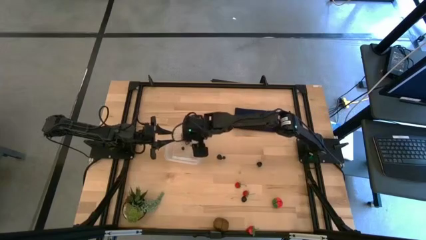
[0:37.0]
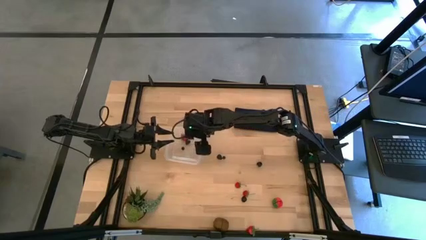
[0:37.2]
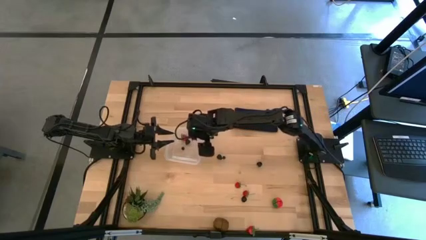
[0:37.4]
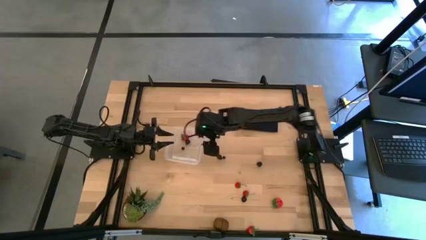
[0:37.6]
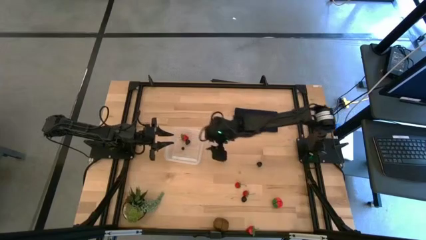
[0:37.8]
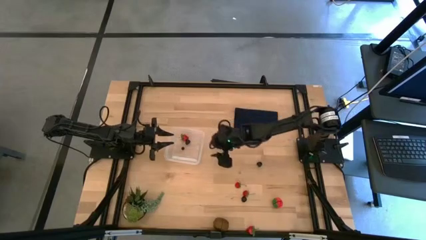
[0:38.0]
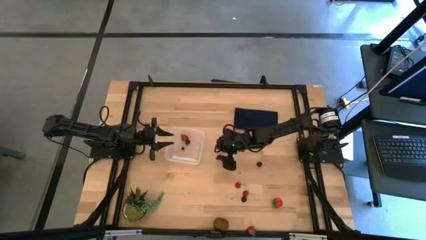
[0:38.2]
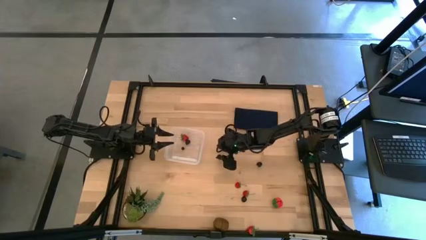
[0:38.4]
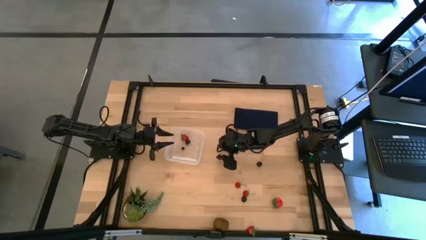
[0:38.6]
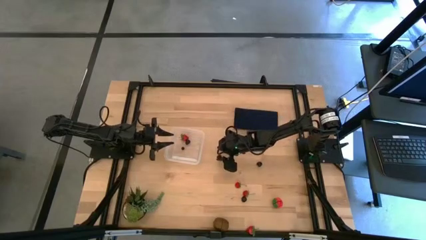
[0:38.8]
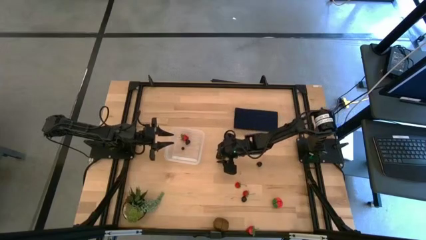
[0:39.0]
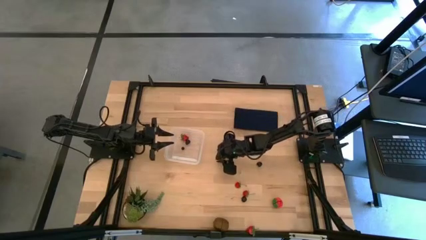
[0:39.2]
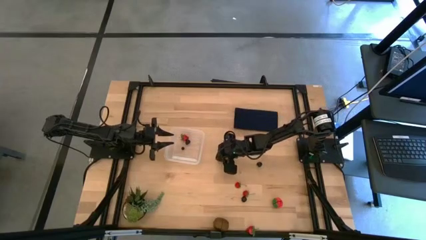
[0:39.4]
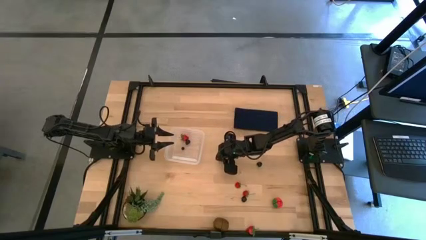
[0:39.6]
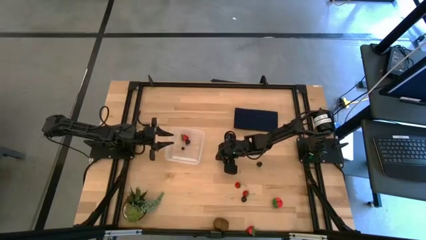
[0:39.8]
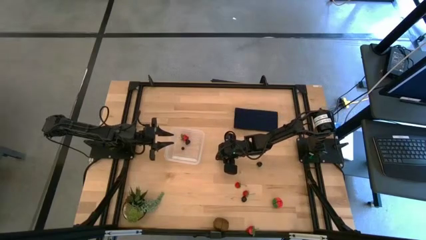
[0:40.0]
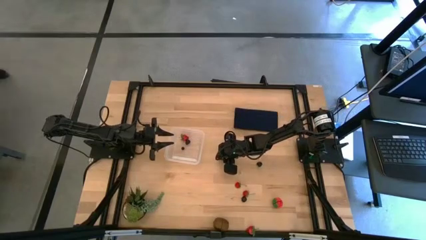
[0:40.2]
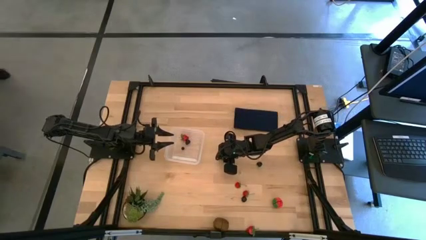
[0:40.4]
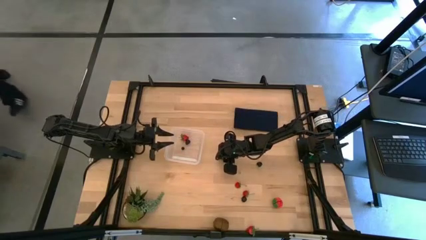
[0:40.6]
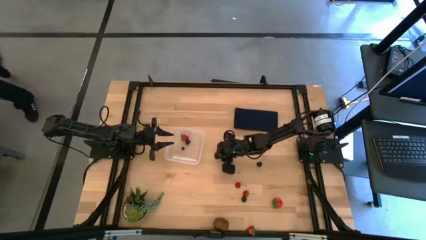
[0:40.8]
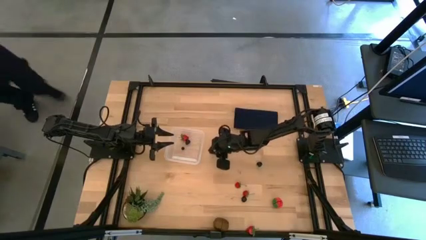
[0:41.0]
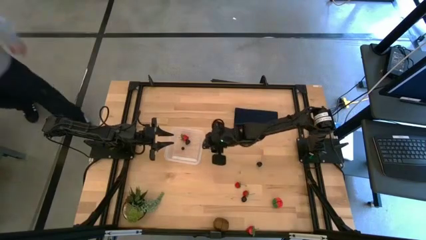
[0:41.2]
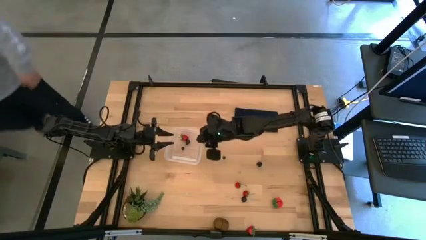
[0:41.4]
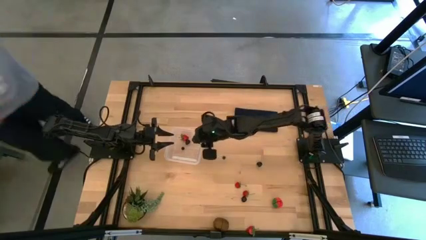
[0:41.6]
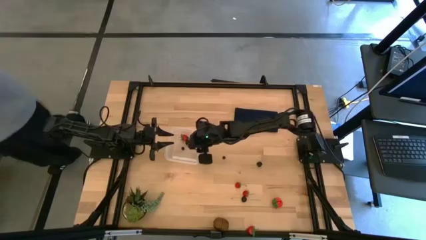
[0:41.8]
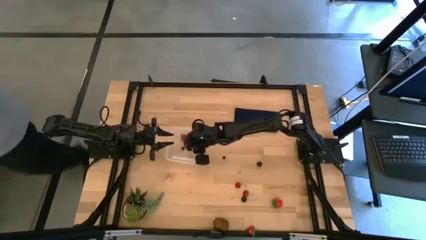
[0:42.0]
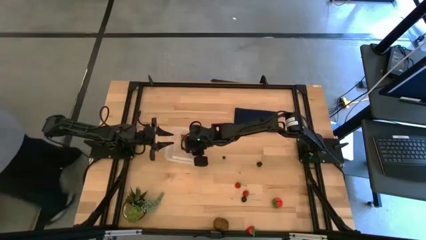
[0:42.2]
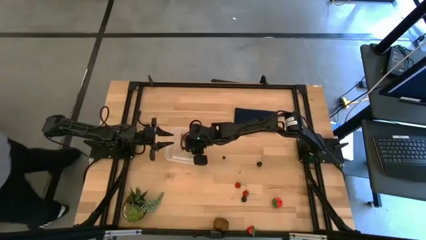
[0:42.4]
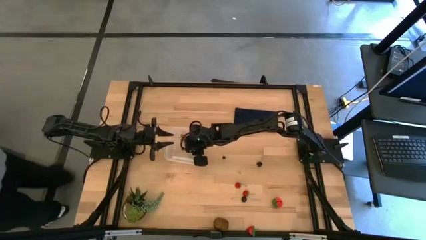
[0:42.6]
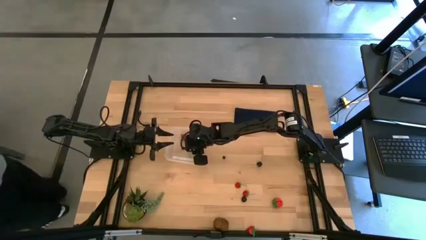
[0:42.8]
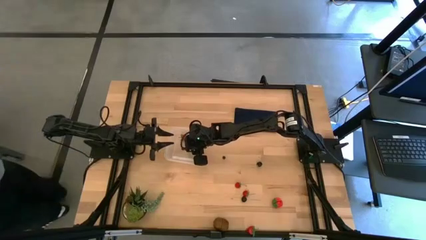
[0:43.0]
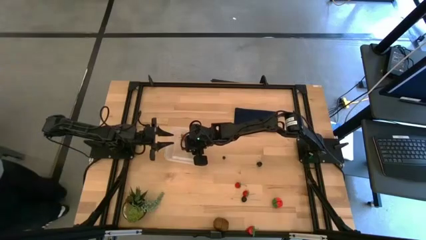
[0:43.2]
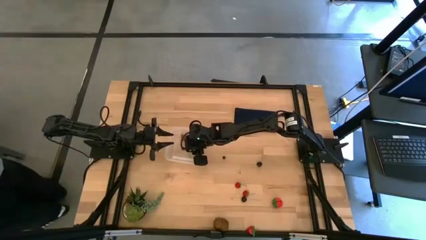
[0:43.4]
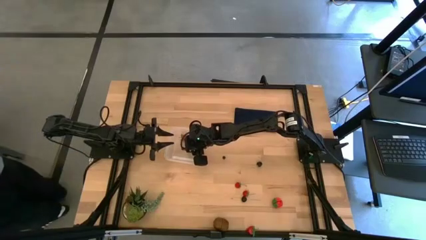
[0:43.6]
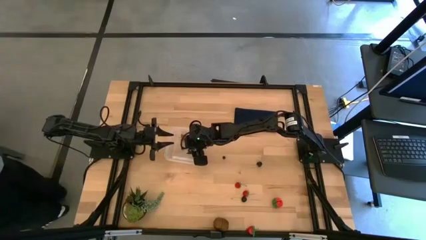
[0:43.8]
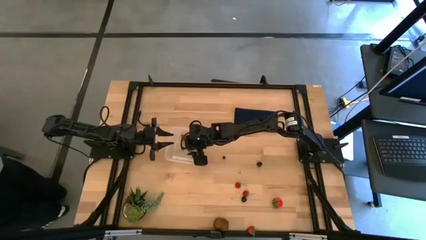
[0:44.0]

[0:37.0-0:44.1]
Task: Pick and placing Produce into tupperware
Put the left blackberry into the transparent bin

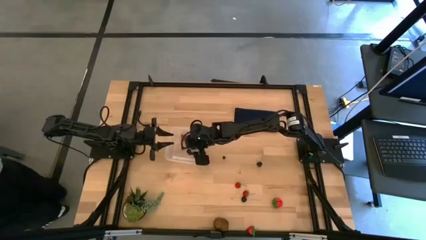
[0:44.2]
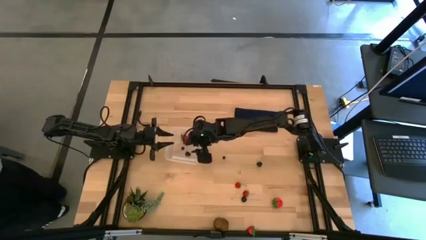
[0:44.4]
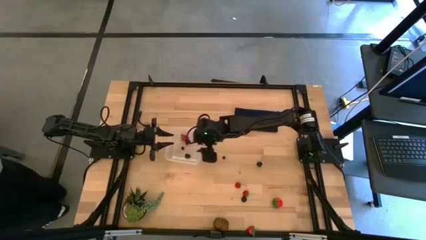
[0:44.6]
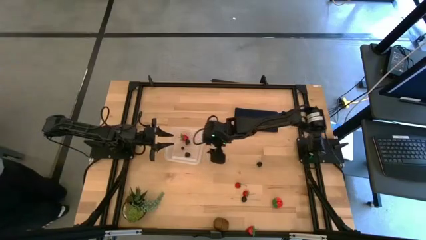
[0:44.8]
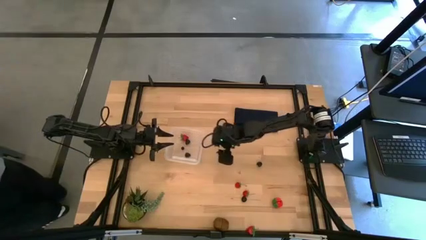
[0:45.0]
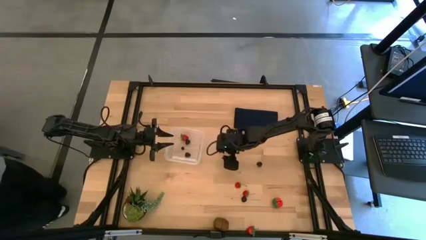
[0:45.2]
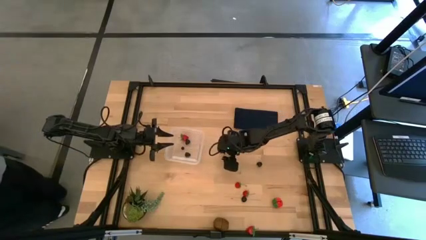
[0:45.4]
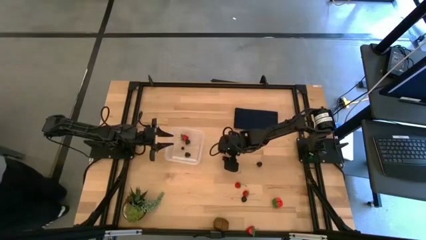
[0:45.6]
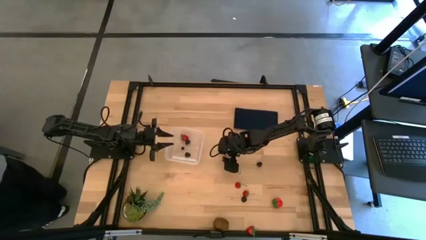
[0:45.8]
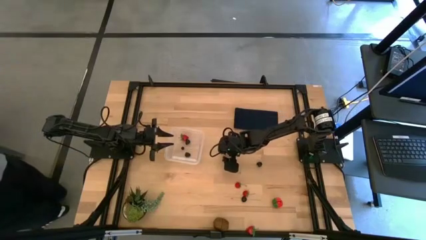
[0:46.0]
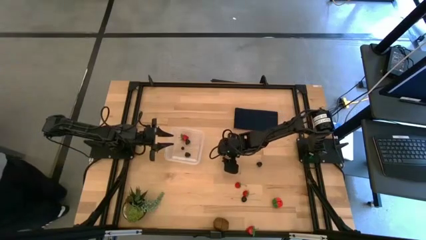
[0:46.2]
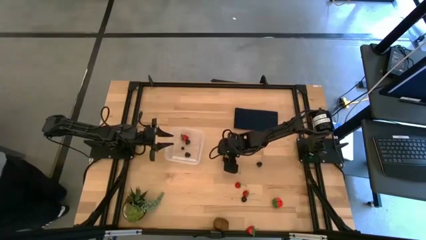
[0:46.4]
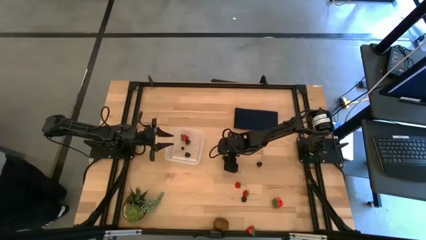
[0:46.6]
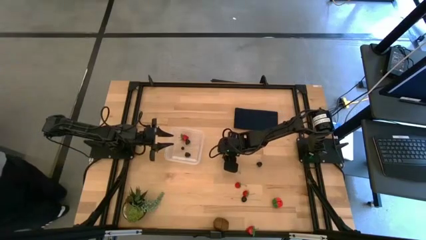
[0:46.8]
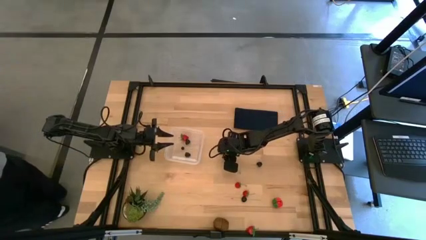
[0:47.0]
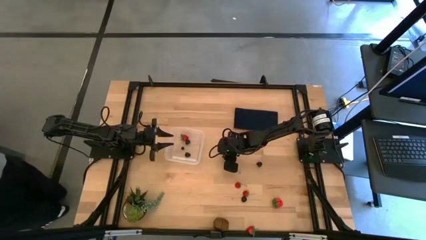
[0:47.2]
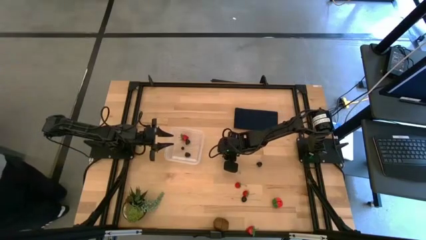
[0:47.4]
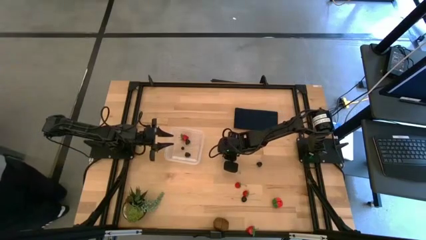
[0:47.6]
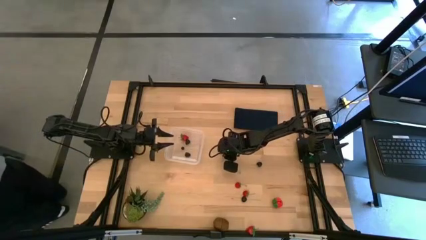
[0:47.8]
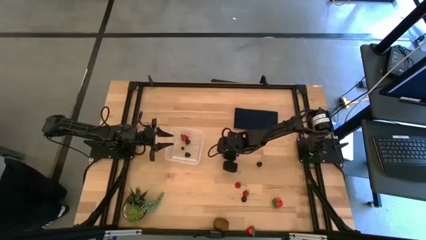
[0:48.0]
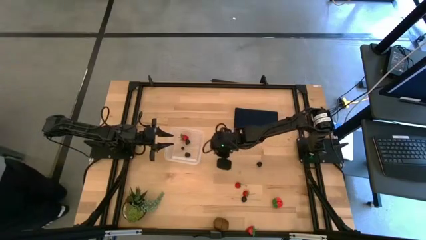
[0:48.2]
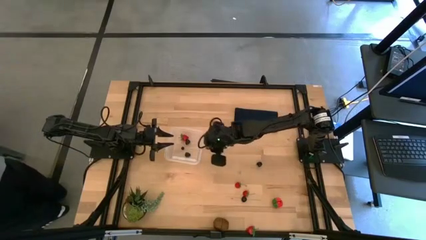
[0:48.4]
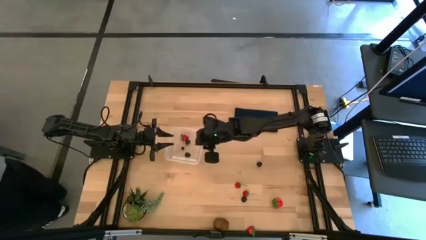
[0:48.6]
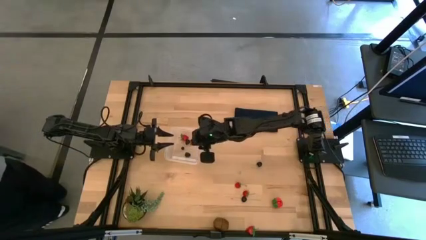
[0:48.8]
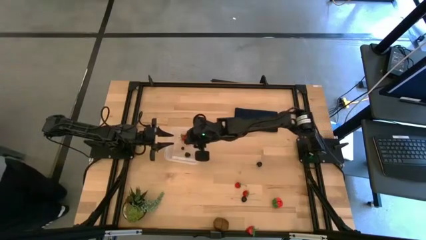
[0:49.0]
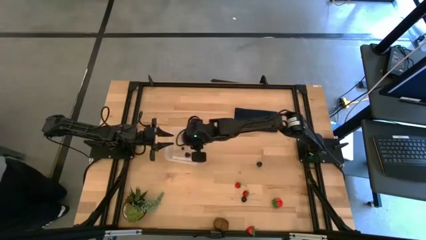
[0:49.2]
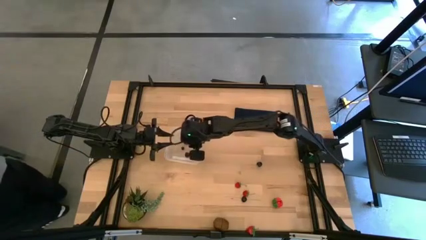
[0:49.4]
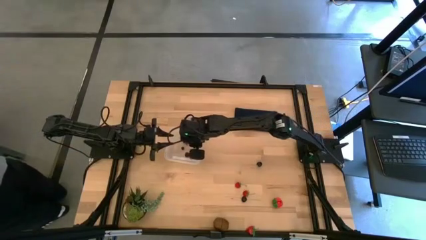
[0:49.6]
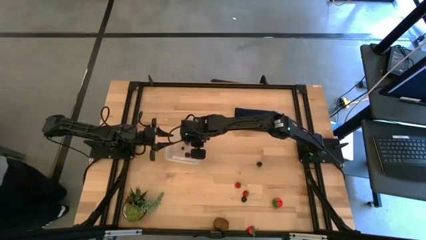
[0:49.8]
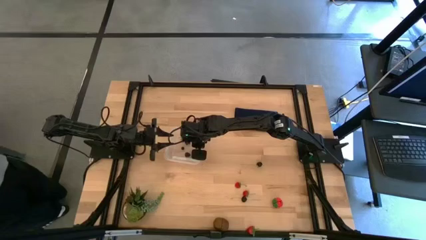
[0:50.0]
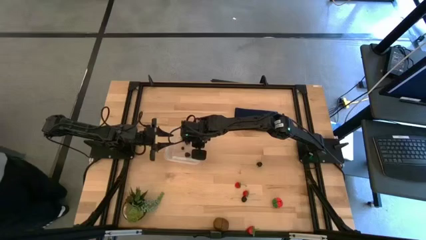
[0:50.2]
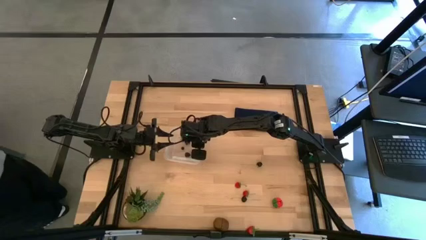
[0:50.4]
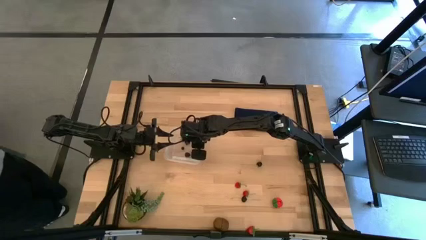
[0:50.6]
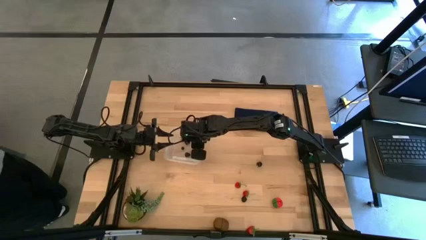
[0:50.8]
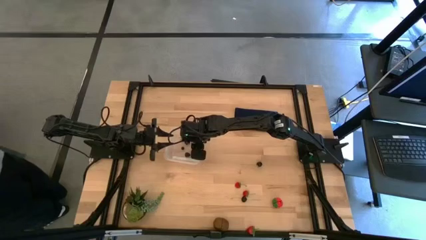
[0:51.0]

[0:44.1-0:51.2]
Put the blueberry into the transparent bin

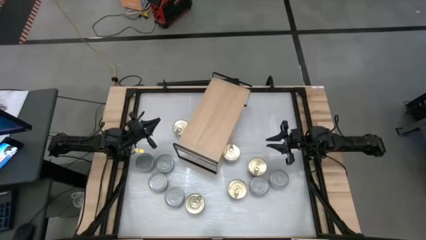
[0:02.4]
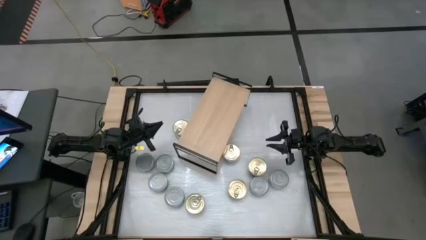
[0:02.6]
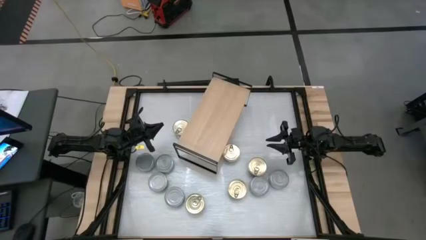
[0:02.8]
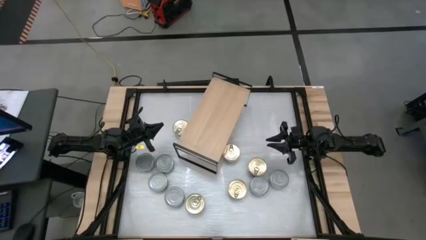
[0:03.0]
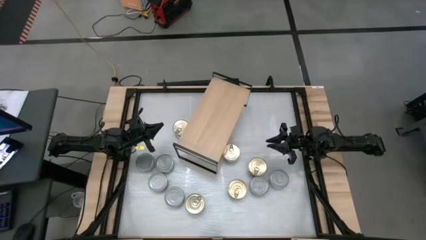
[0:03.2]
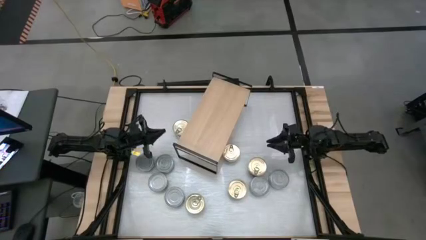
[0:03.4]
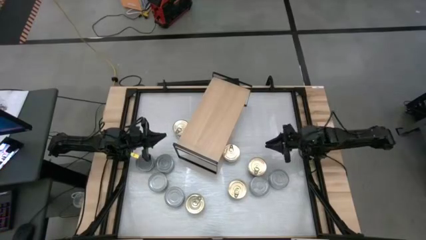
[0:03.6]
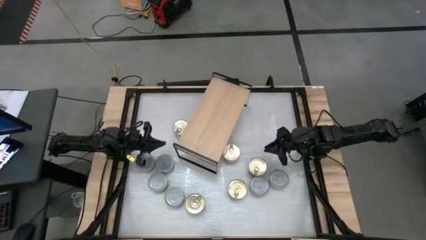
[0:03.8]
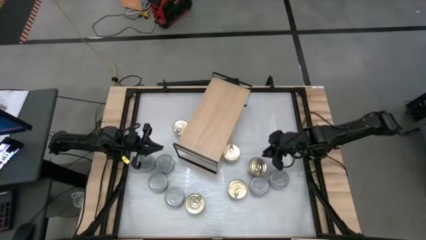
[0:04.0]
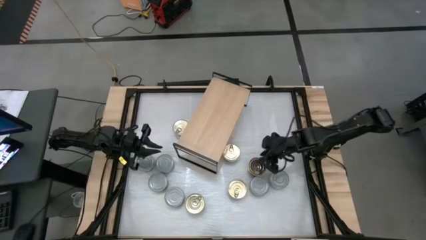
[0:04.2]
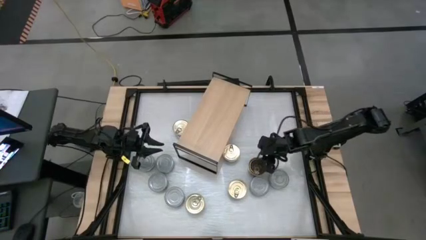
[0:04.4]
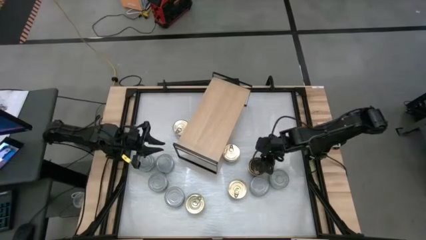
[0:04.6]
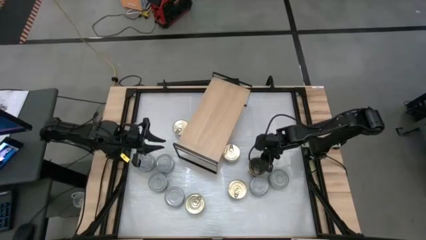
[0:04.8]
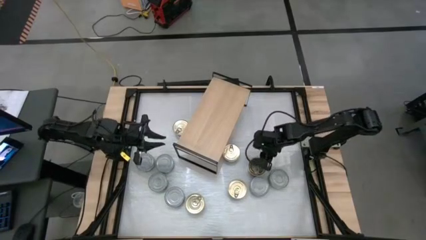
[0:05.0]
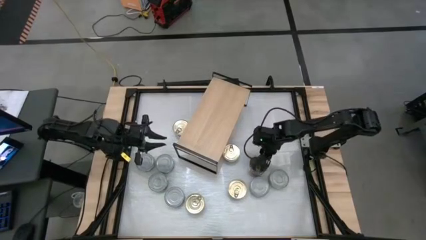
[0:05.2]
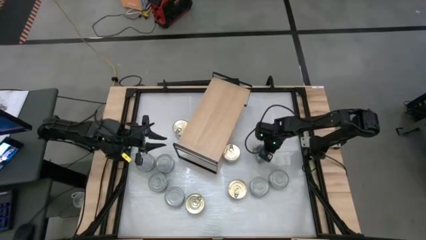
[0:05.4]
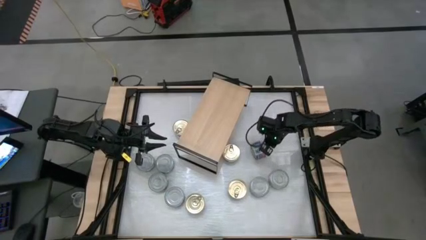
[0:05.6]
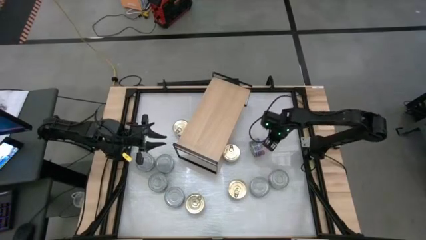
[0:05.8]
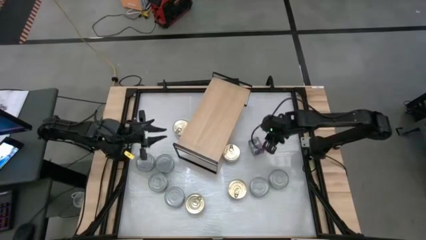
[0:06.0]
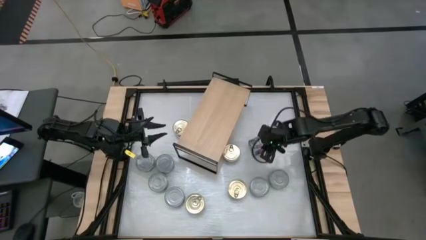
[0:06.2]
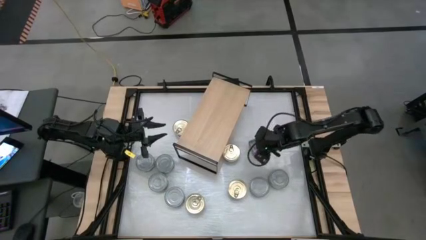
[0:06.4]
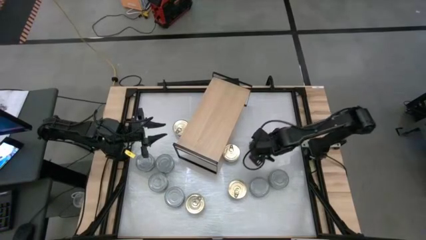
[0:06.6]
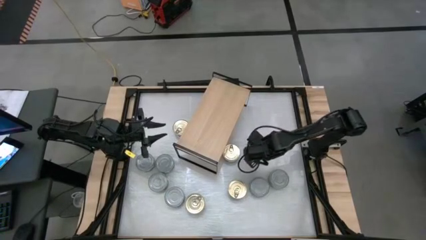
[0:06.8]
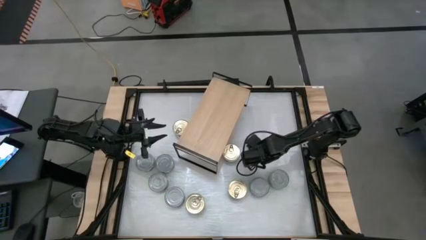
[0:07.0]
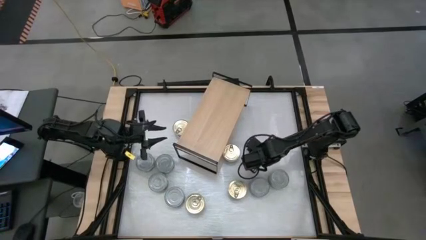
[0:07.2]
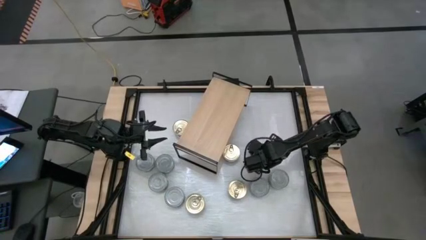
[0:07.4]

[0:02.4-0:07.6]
Task: Stack canned seafood by type on shelf
Put the blue tuna on the shelf
